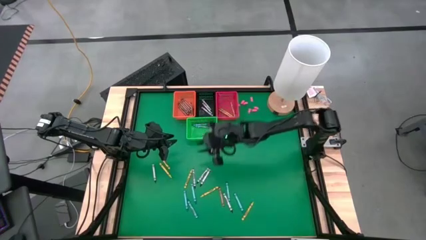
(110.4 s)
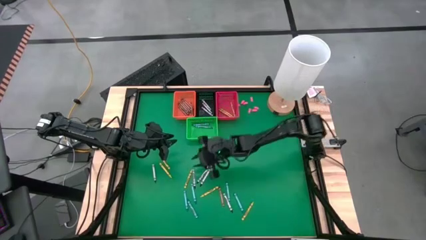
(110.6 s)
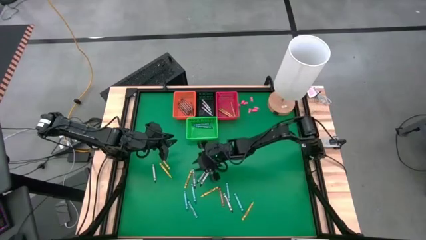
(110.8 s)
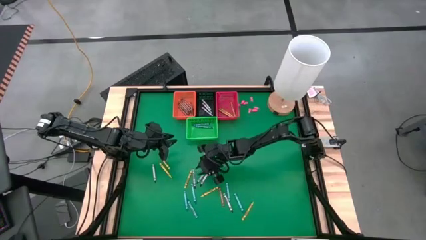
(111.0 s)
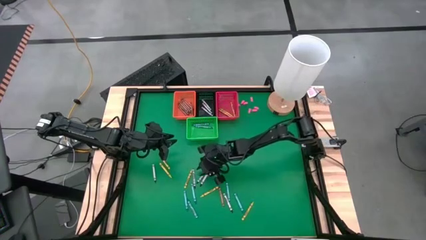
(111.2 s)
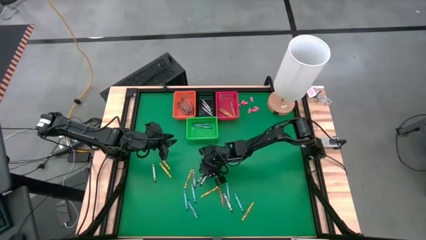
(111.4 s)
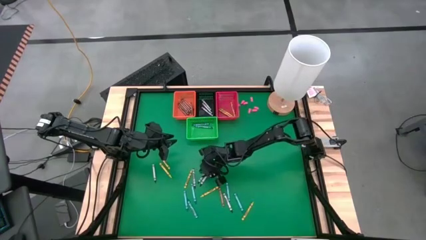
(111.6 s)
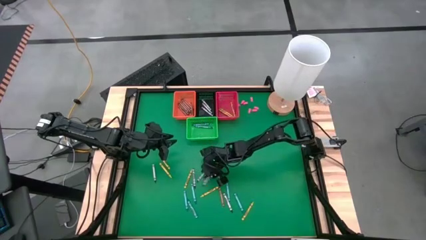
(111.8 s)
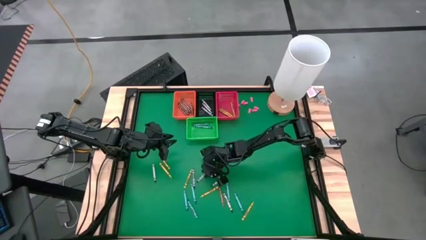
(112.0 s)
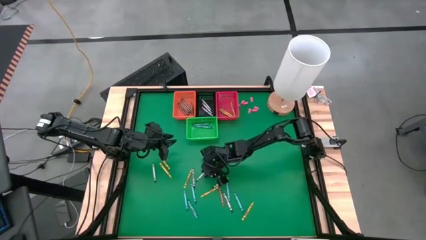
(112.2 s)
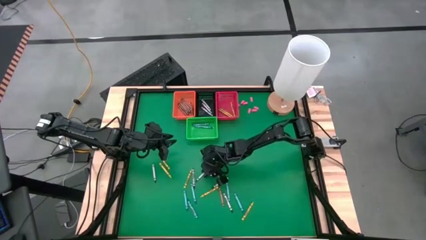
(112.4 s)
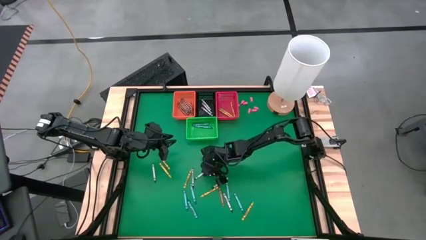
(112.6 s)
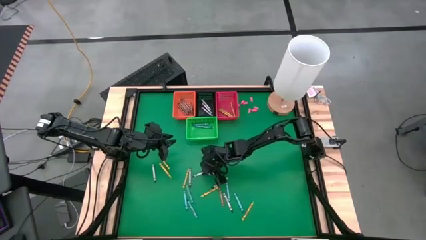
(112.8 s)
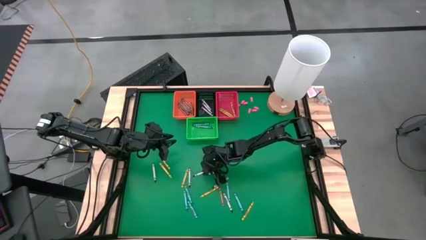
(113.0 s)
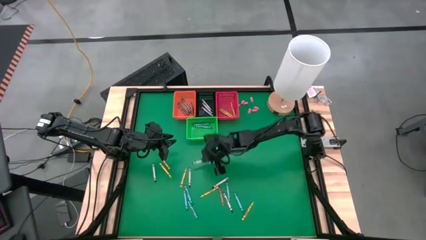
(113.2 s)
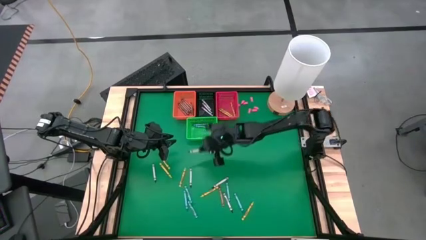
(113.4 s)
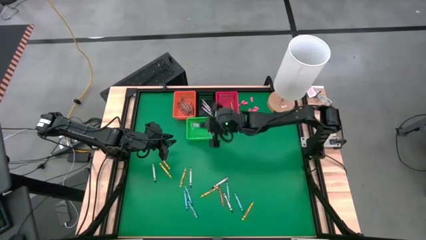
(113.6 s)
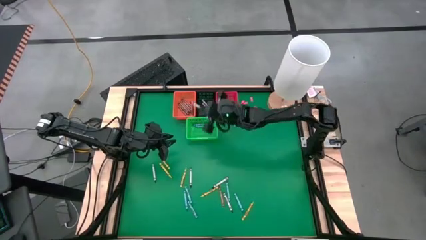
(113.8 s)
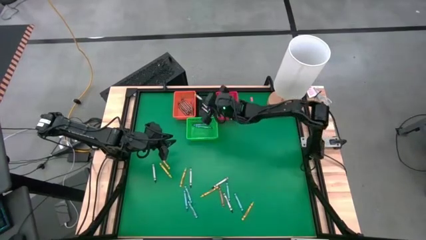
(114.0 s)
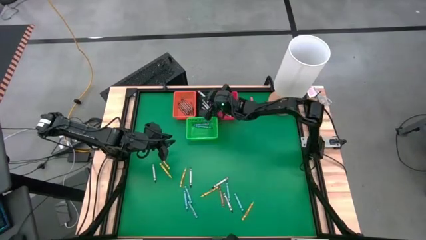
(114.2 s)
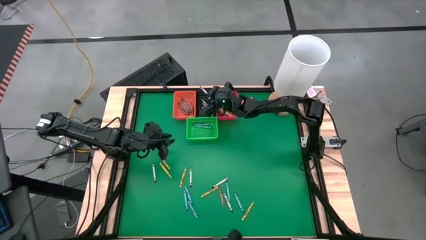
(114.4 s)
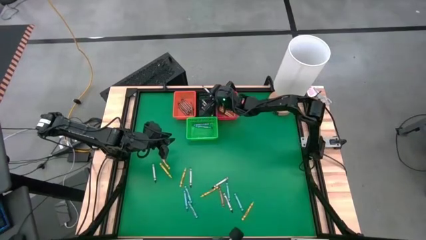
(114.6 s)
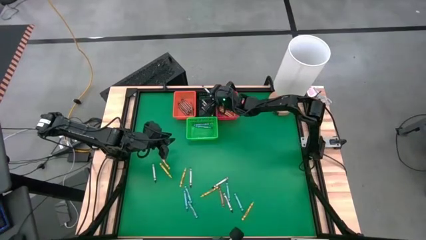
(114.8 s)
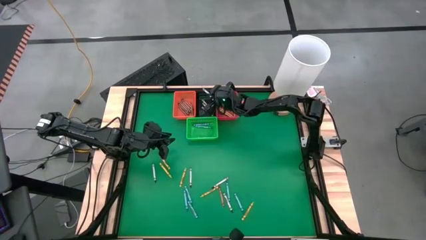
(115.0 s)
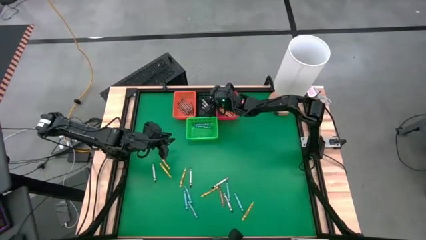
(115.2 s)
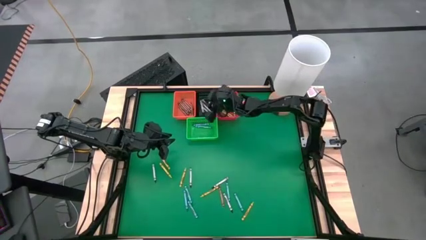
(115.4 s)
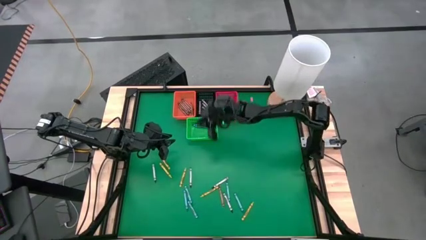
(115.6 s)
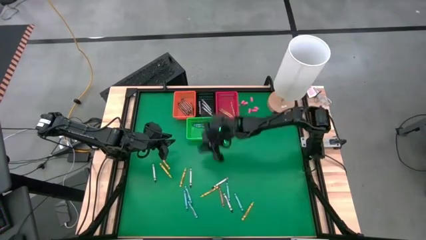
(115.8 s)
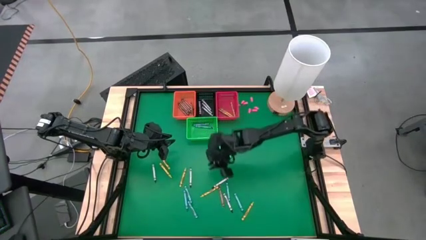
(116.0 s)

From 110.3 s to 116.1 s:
Task: Sort crayons
Put a black crayon in the black basket

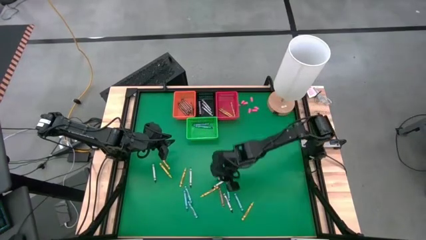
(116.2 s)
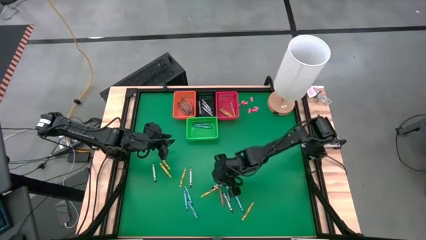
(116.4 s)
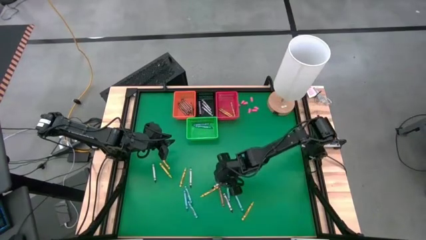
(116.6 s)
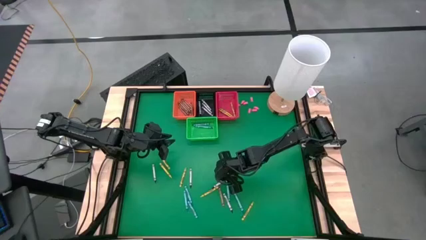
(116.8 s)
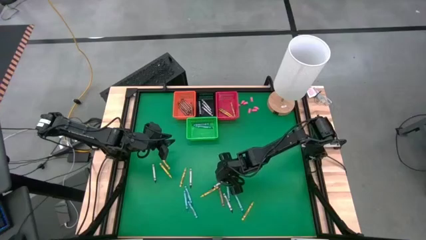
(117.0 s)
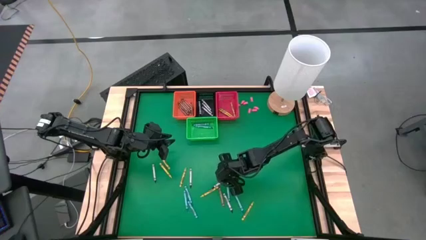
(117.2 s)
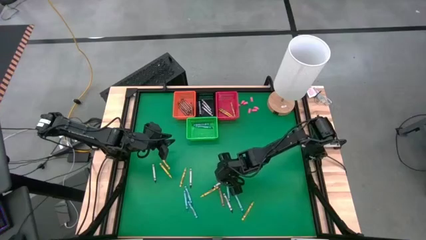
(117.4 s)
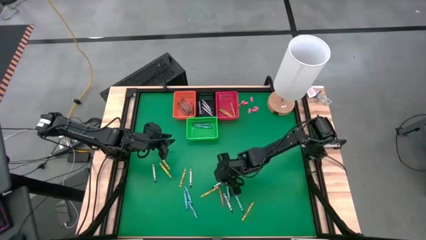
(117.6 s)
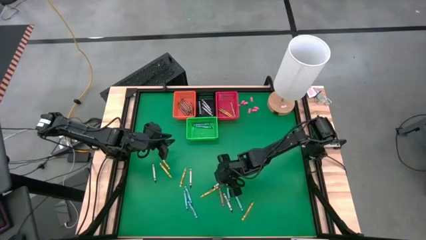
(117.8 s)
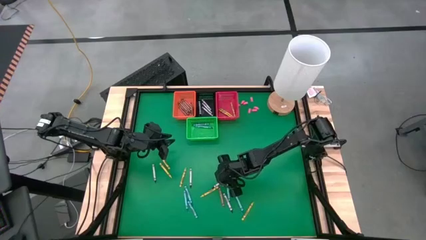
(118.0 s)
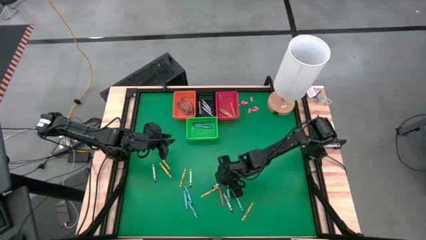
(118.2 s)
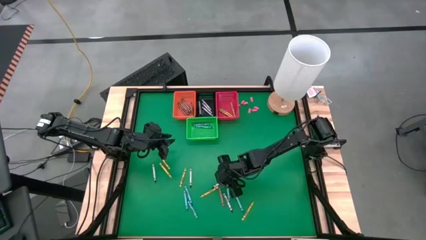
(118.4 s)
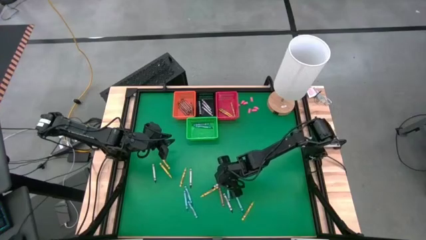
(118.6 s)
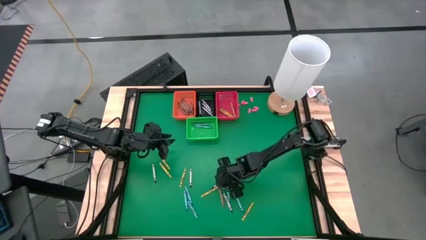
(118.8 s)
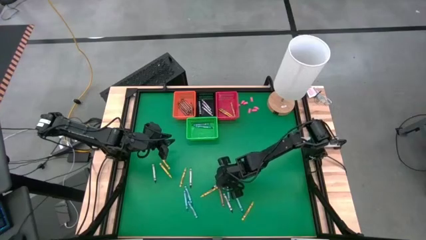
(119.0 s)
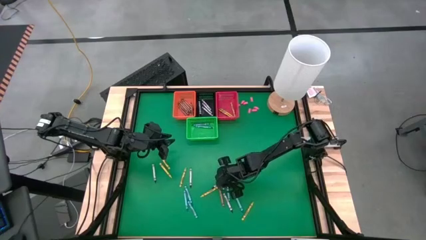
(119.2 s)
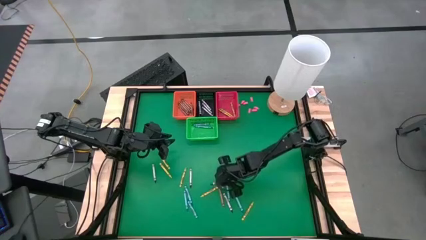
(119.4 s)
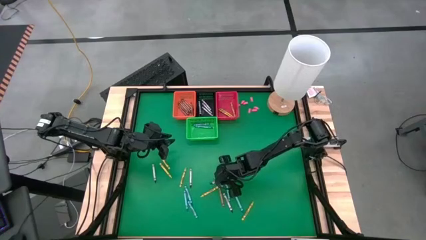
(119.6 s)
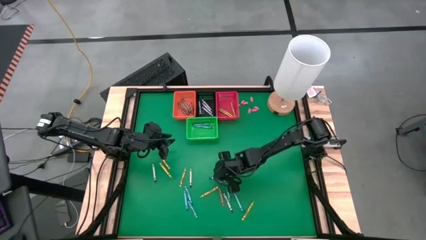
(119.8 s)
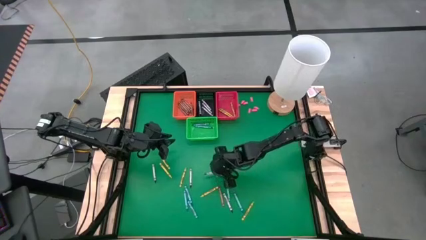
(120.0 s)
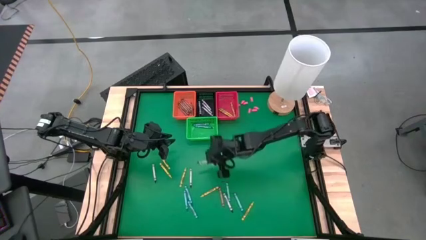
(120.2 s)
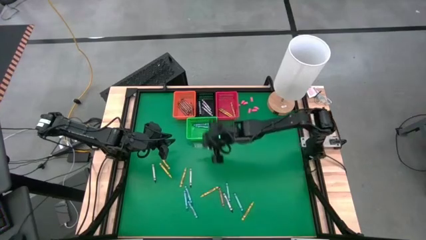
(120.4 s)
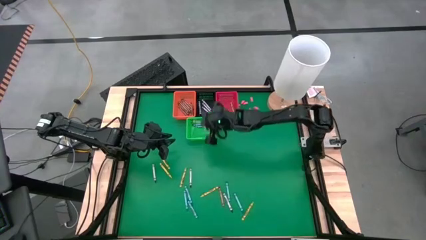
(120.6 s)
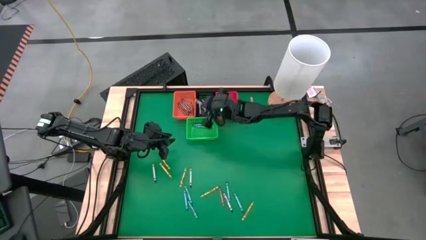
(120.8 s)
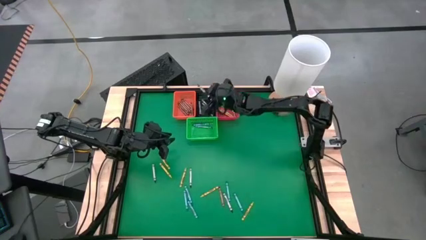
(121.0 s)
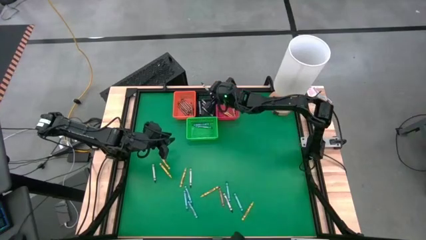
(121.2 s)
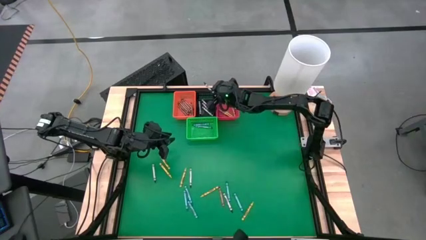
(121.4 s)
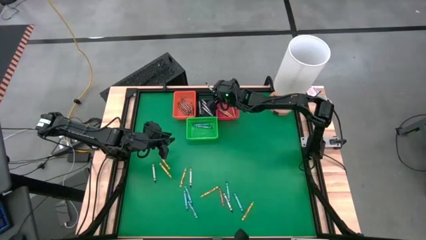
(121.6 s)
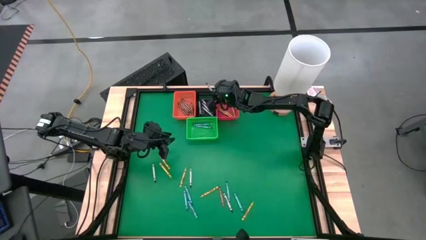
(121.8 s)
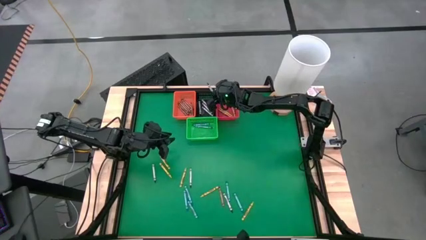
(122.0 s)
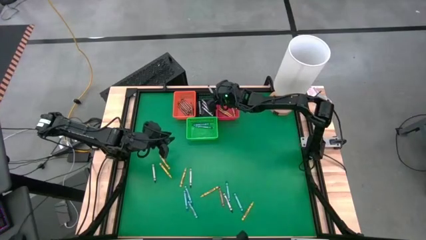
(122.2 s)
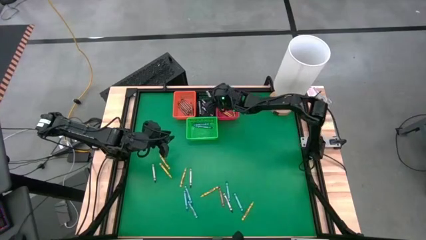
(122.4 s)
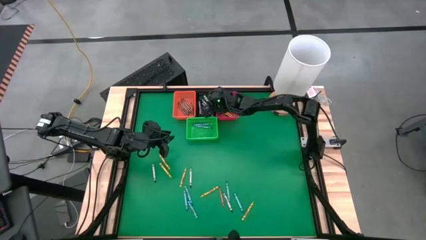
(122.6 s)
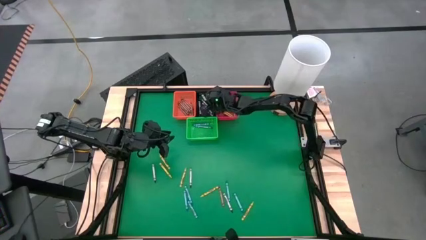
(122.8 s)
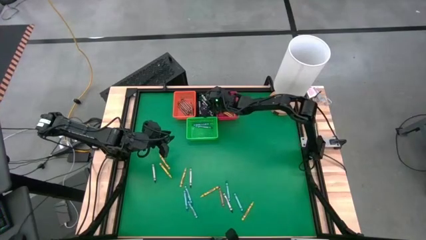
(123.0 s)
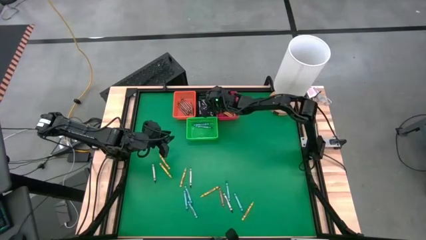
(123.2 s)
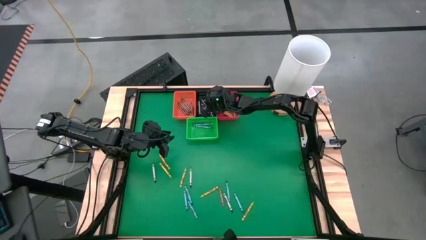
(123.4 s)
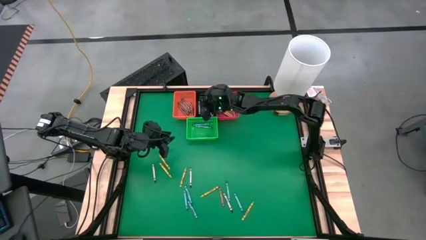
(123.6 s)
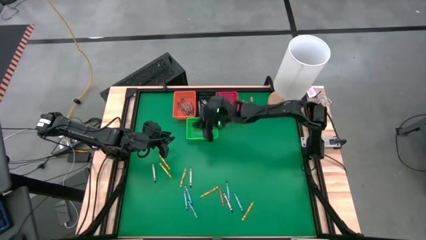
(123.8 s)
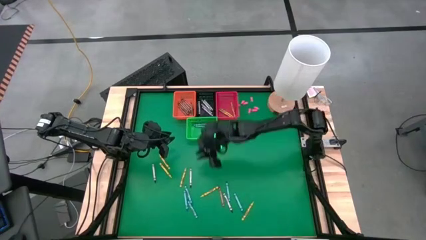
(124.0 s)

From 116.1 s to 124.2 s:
Put a black crayon in the black basket
